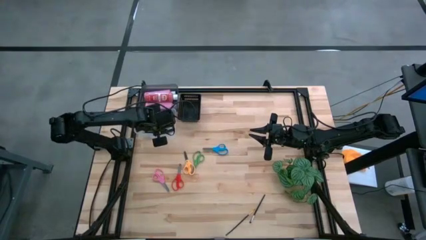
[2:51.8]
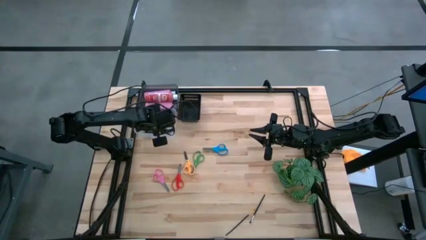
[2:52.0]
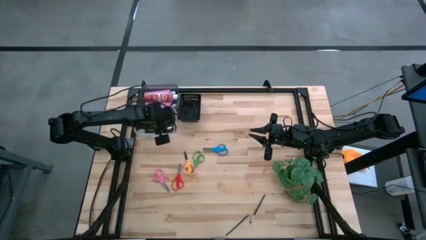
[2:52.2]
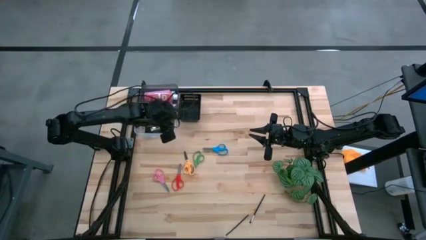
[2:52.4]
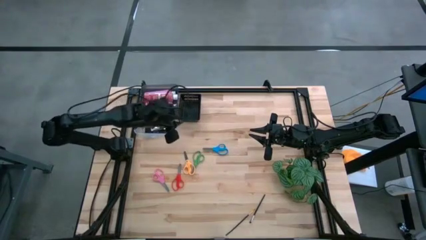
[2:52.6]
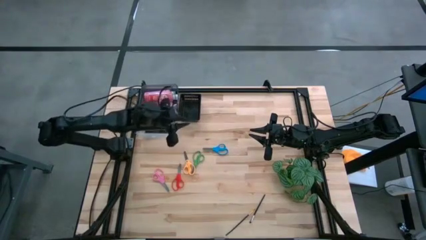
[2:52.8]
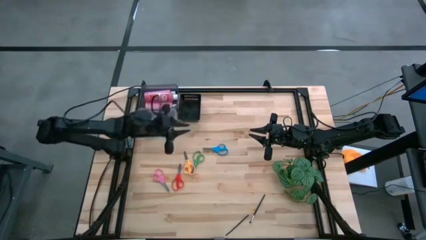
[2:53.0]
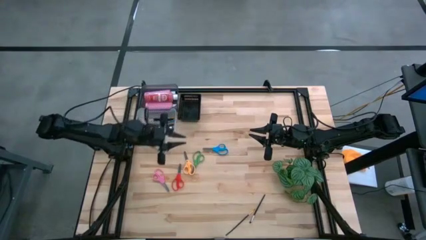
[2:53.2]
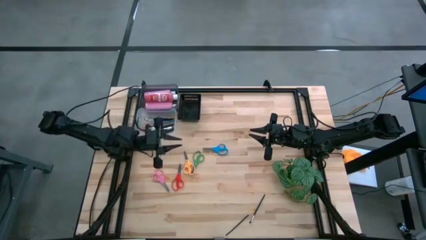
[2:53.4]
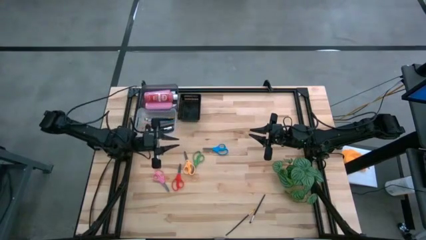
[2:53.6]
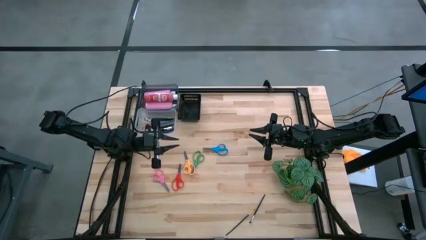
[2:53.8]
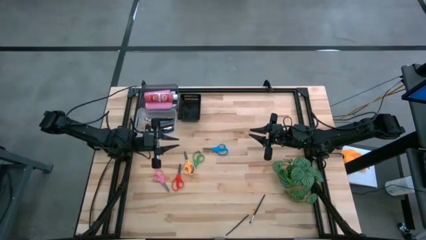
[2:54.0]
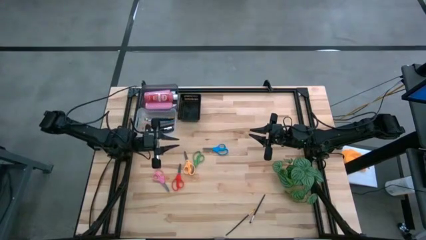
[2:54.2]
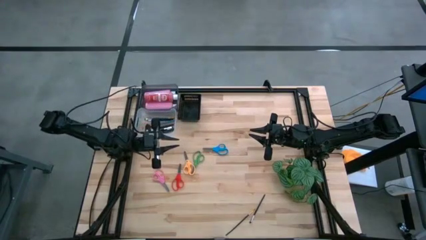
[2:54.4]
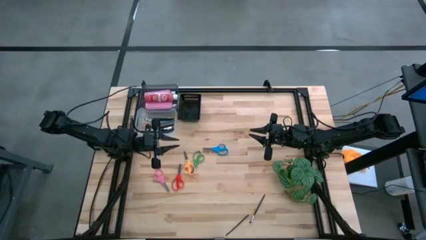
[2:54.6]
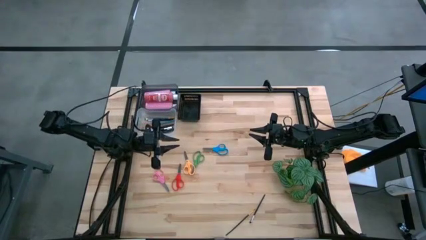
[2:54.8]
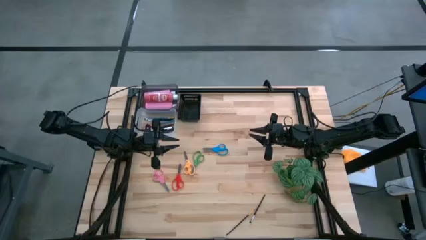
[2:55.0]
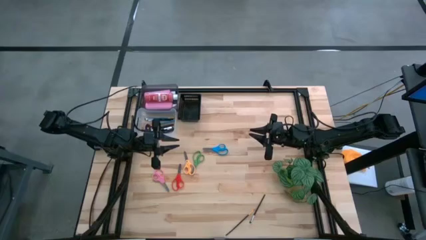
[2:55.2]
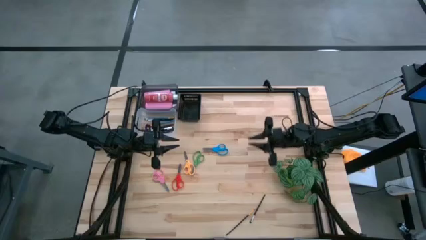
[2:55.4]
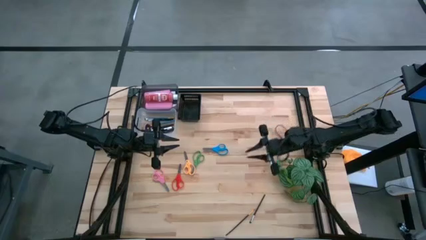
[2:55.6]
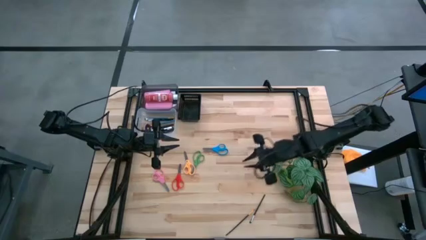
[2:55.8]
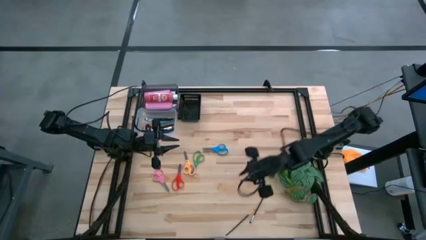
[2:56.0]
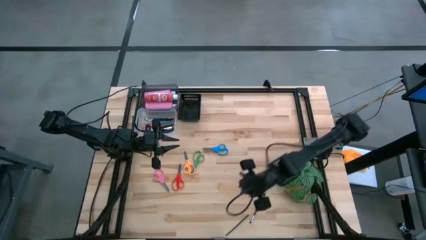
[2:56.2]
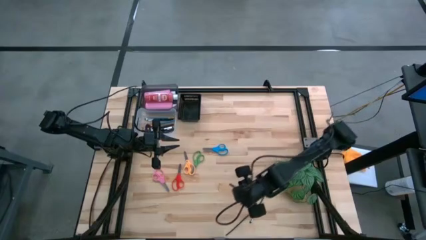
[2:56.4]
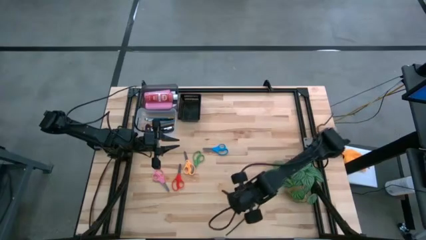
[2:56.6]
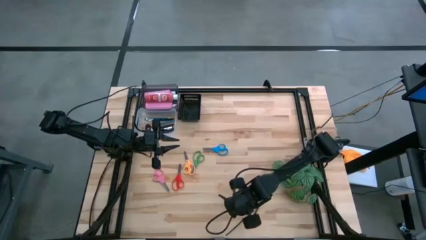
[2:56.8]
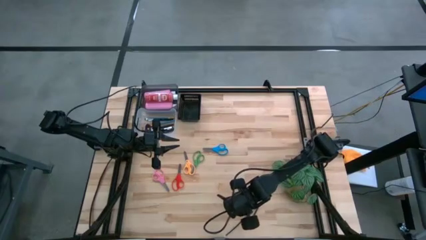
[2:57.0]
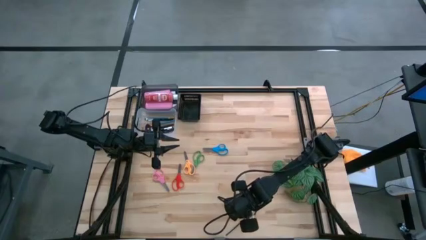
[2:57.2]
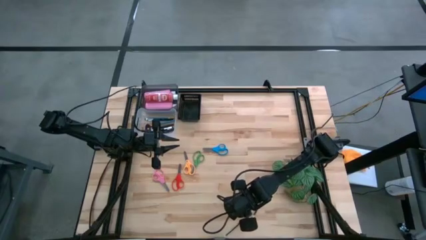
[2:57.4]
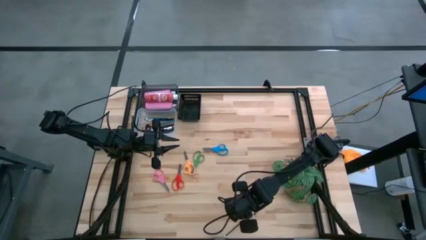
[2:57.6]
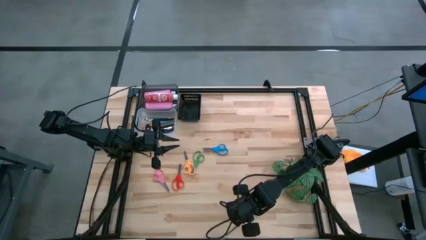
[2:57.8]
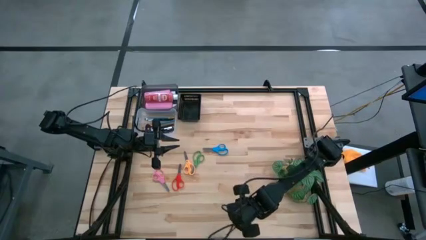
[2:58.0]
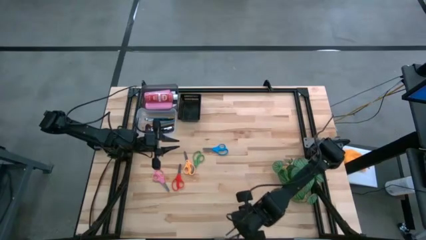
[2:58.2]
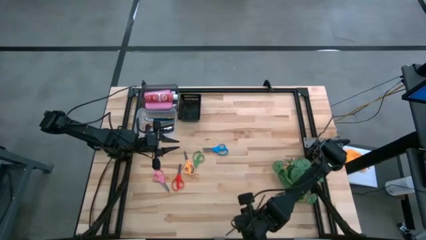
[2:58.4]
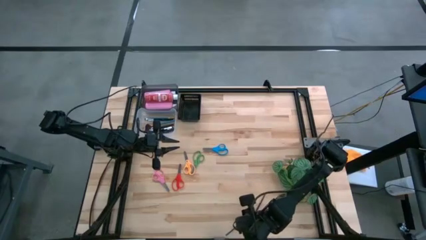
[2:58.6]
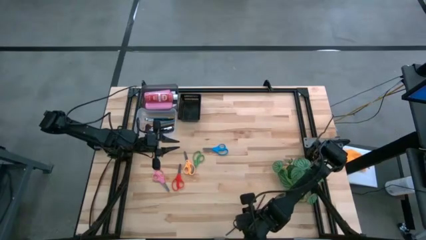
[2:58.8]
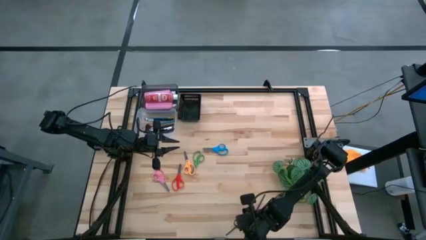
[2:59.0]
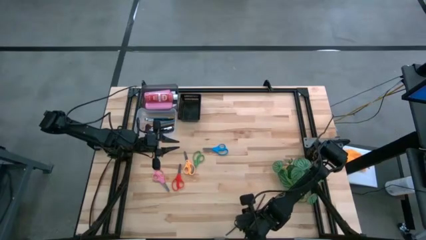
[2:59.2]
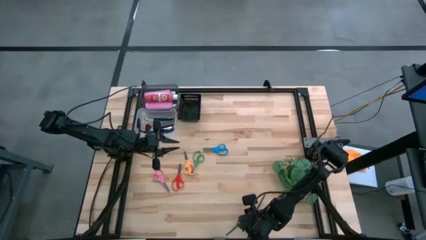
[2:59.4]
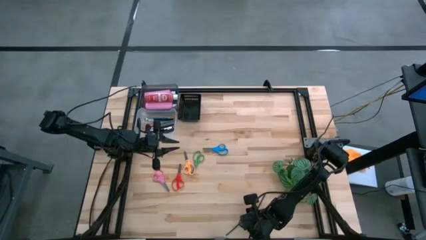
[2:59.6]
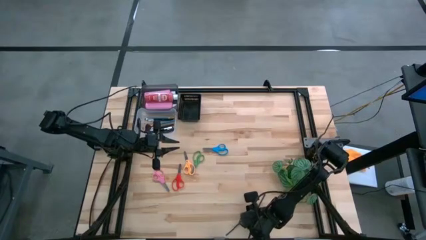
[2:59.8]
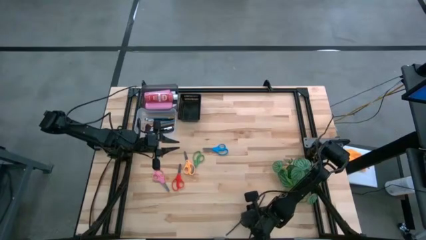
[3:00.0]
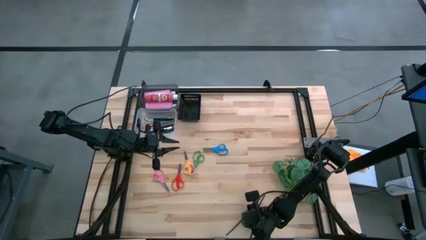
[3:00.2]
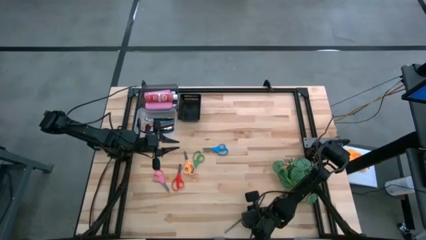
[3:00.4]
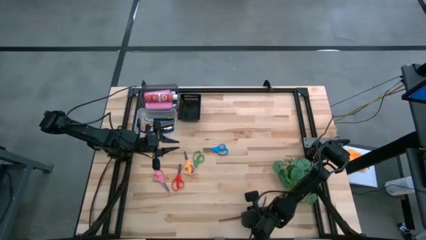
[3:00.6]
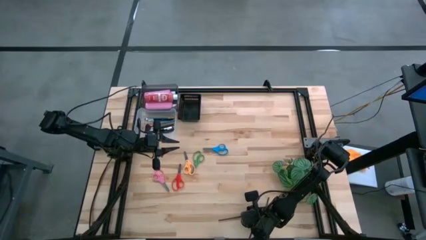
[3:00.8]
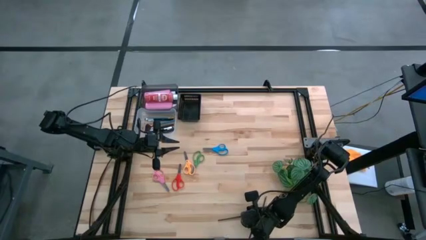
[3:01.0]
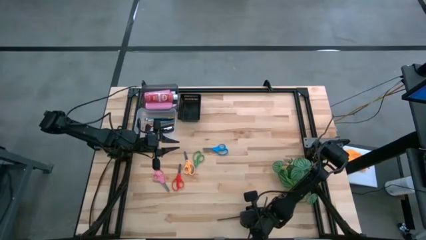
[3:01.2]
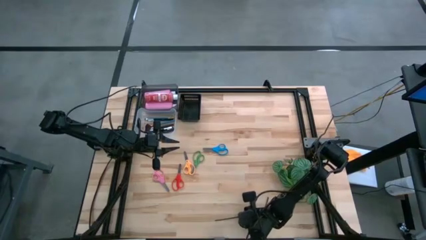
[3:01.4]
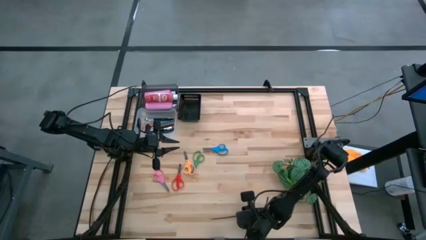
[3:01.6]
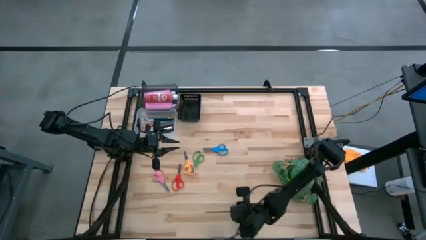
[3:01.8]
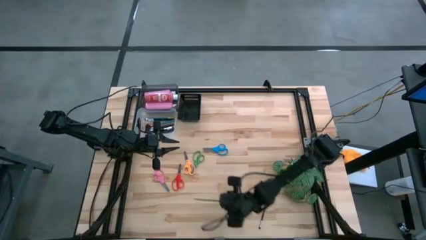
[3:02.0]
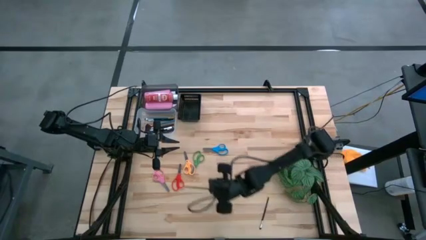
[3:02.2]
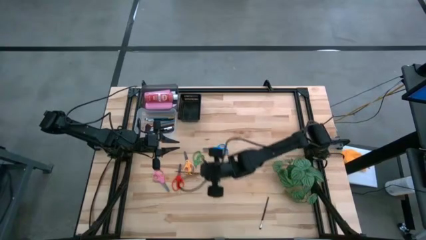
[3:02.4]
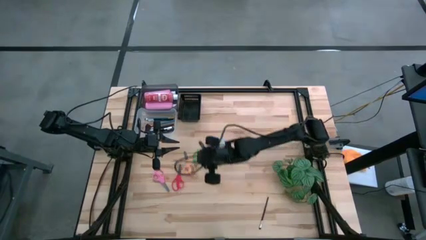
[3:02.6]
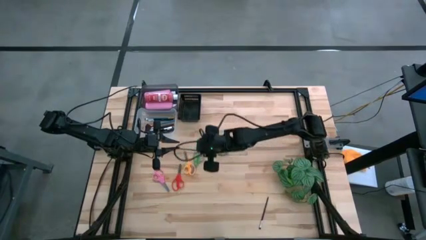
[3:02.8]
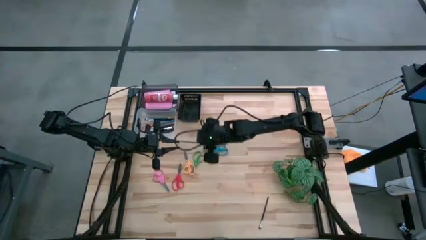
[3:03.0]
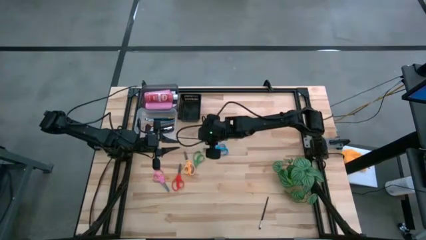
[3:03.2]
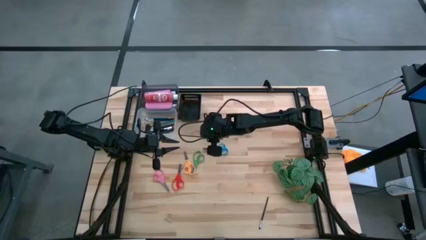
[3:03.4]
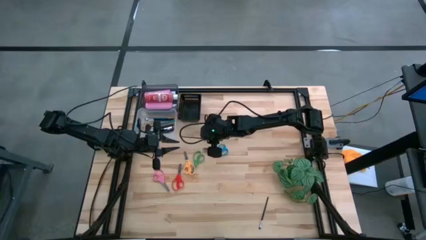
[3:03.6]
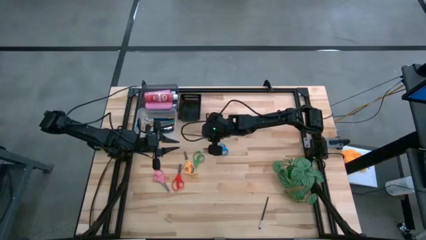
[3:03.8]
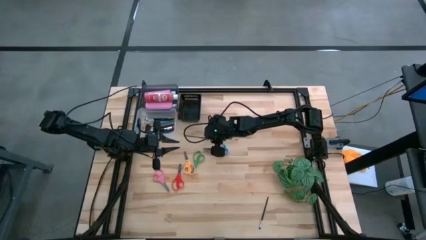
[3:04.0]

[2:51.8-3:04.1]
Task: Pick & Place Paint Supplies
Put the black paint brush into the transparent bin

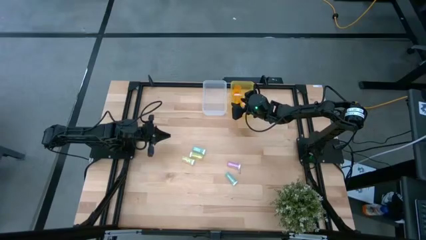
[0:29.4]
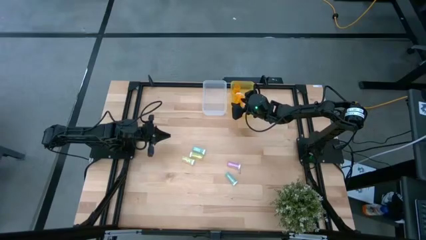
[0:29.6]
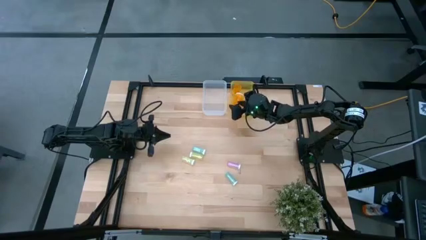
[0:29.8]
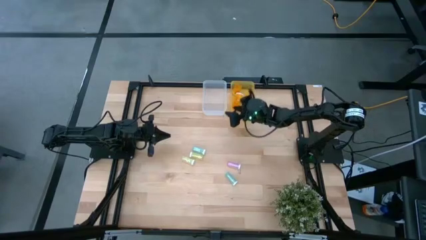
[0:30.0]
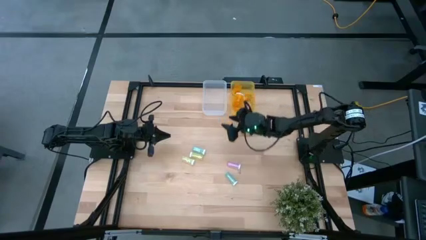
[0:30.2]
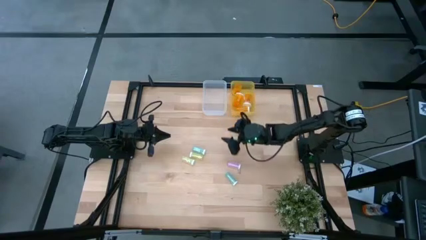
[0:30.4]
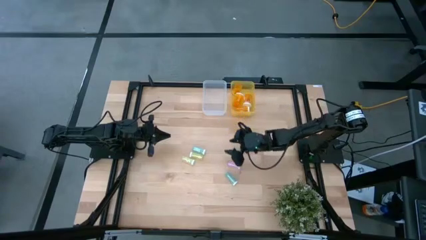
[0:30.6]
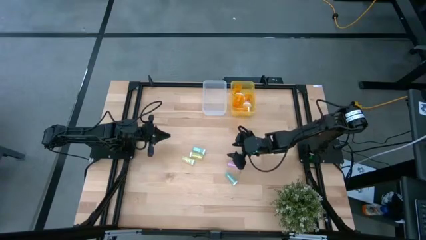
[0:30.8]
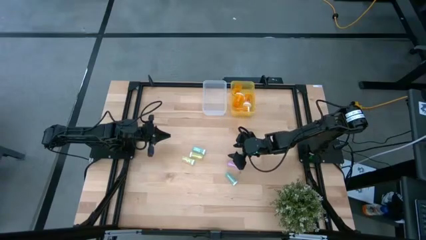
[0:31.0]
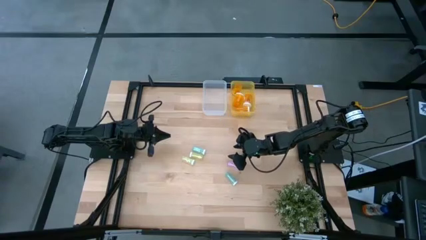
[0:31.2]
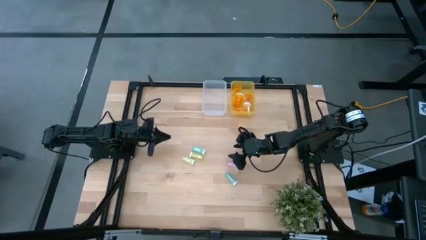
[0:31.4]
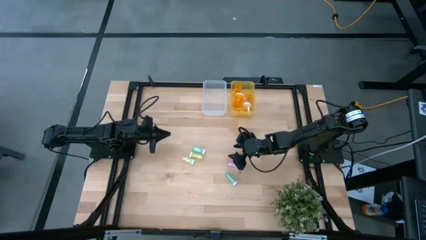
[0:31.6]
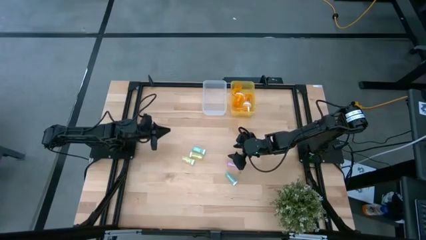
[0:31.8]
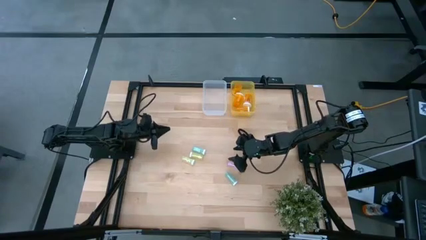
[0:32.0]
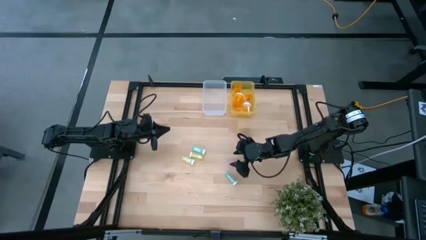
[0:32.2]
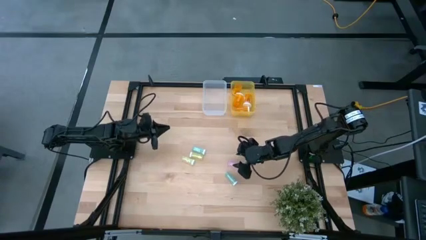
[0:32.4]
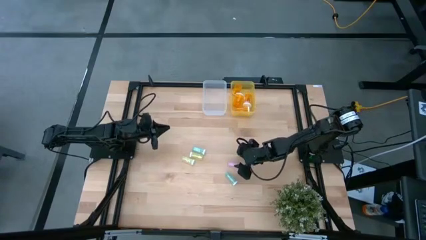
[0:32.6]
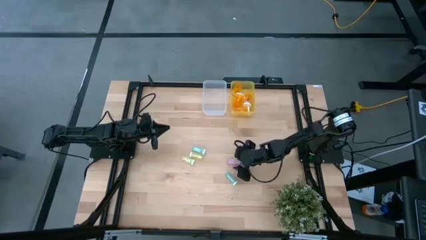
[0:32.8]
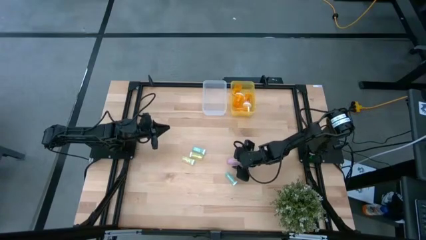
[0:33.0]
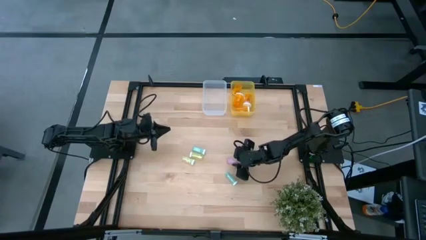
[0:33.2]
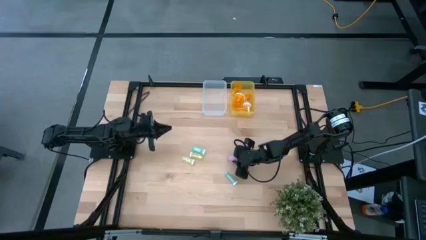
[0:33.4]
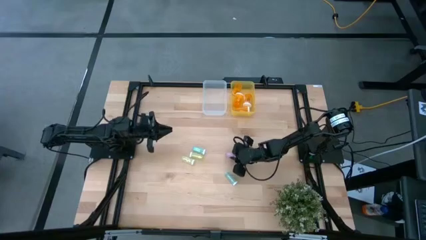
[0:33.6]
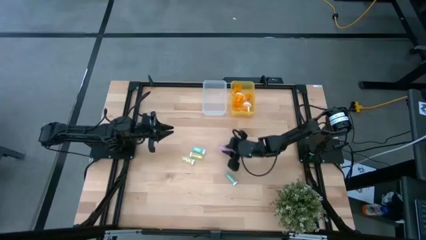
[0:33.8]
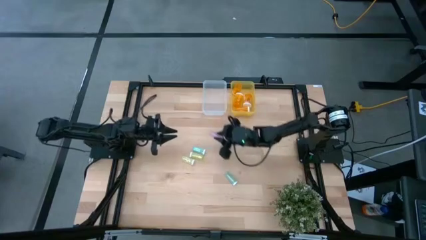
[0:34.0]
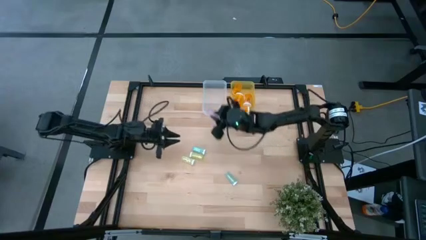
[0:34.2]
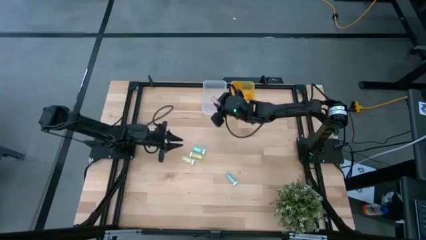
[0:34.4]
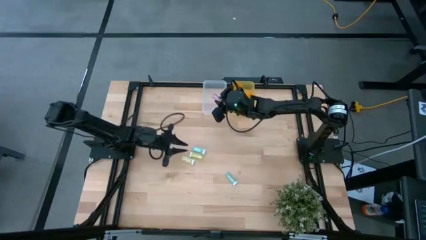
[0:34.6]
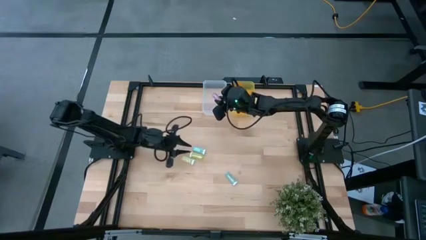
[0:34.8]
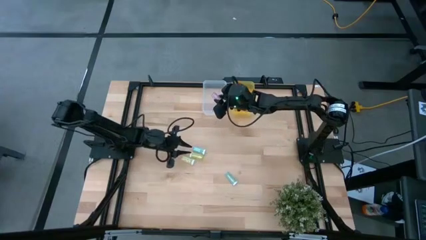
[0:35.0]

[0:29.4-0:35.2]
Task: Pick and place medicine bottles into bin by pill shape (circle, oval)
Put the small pink pill bottle into the transparent bin
